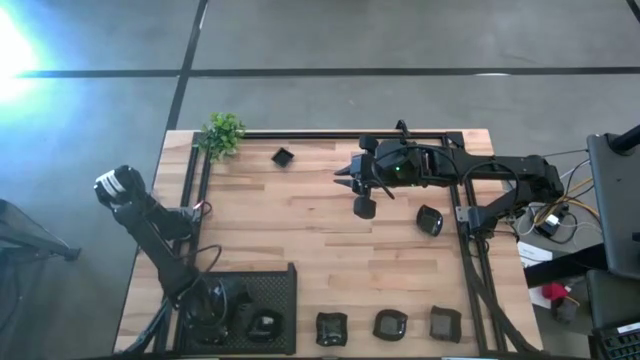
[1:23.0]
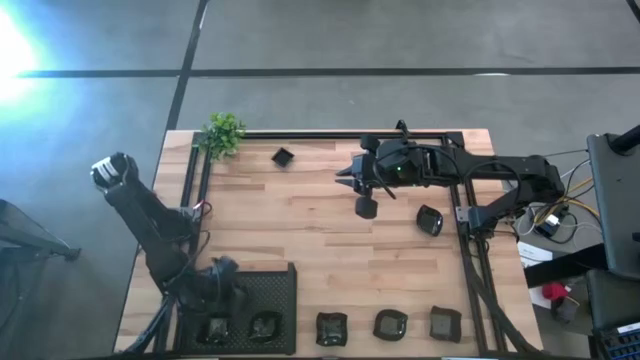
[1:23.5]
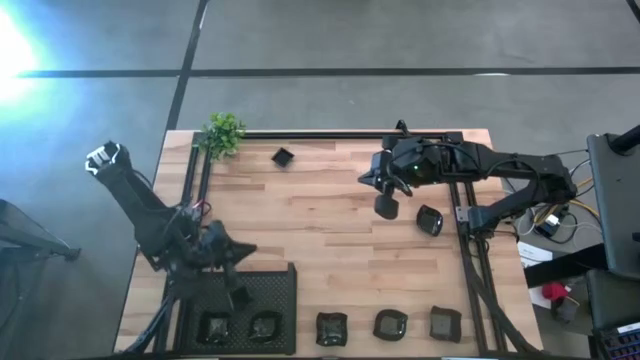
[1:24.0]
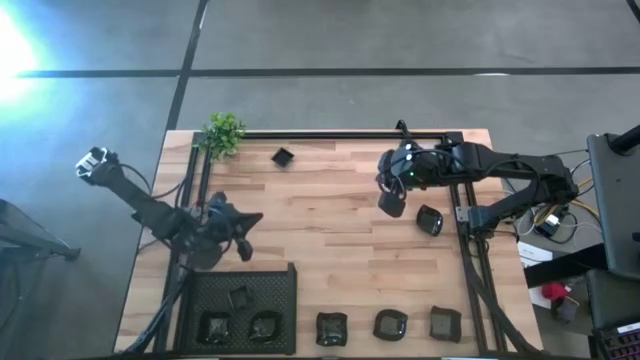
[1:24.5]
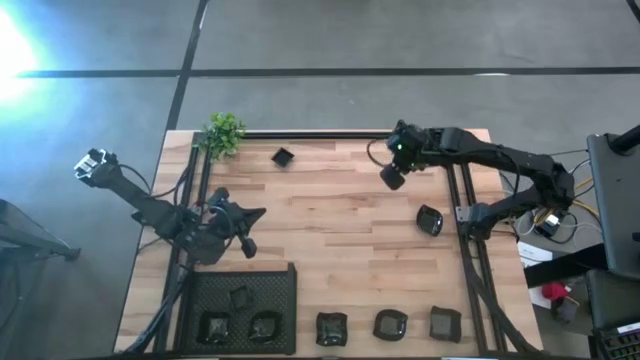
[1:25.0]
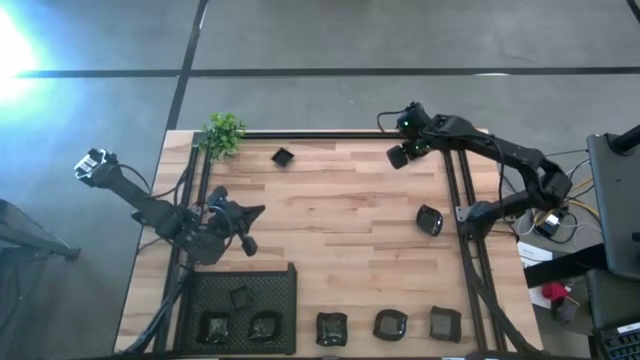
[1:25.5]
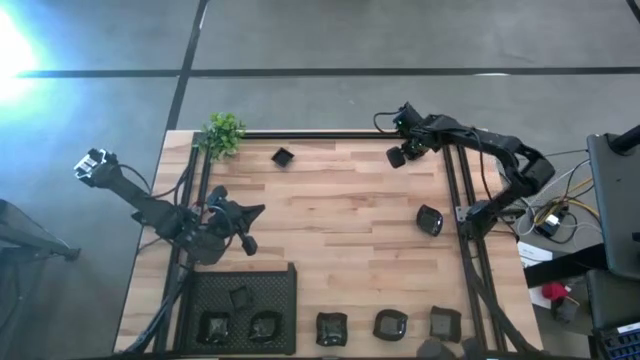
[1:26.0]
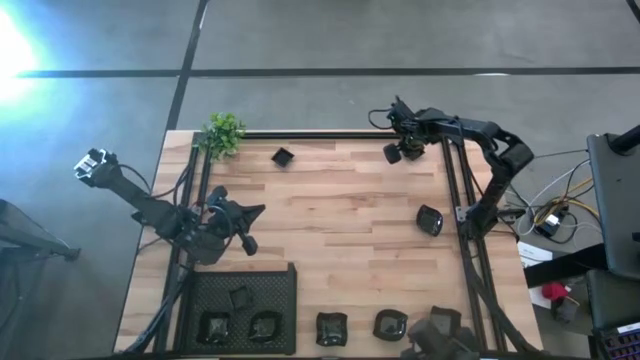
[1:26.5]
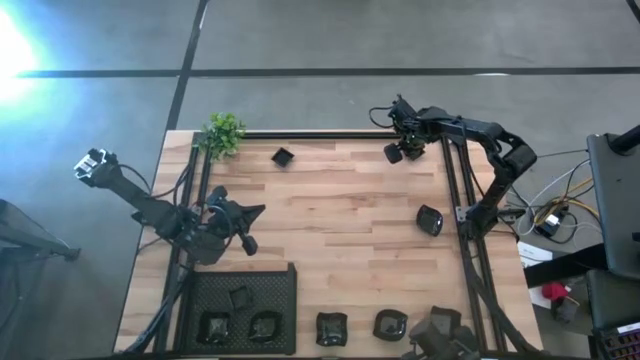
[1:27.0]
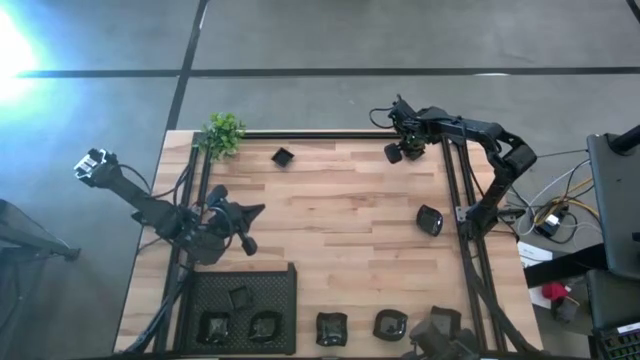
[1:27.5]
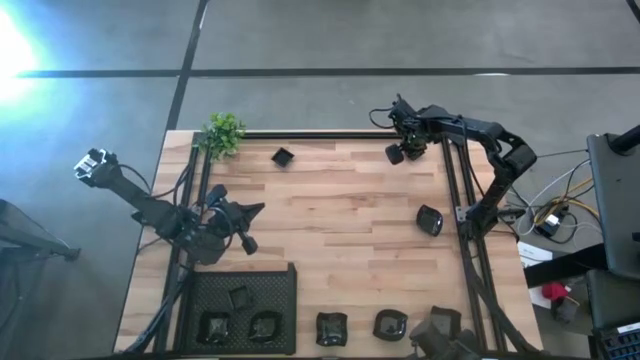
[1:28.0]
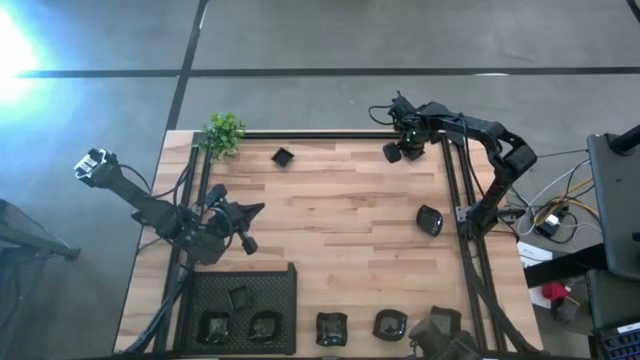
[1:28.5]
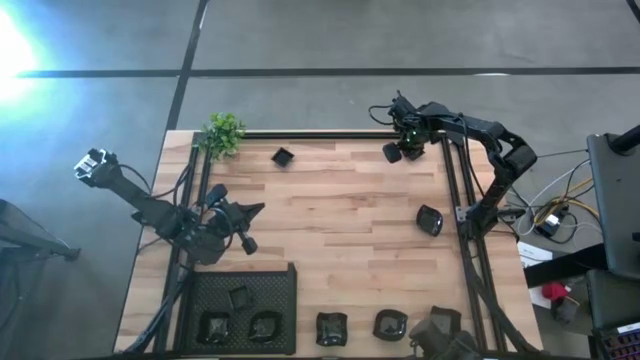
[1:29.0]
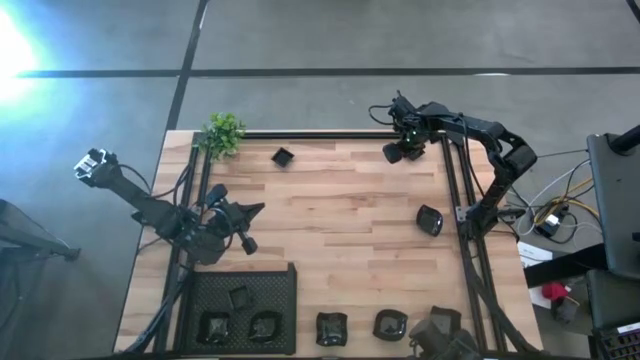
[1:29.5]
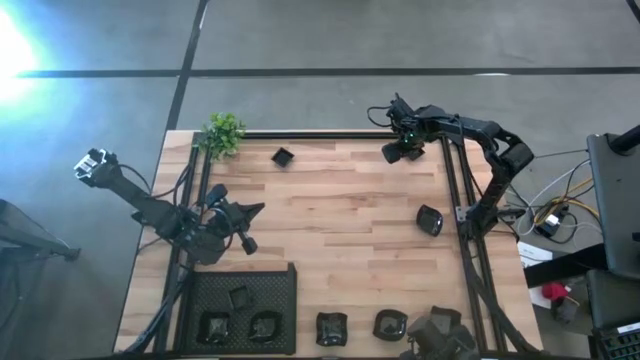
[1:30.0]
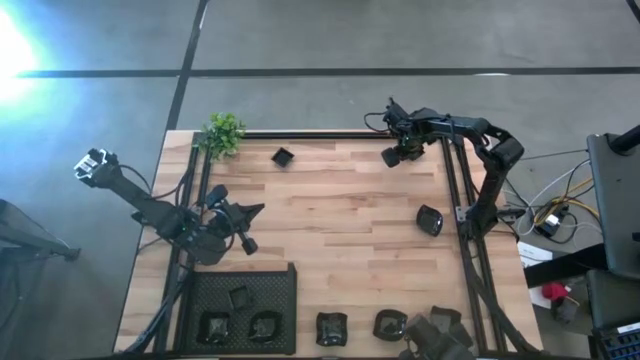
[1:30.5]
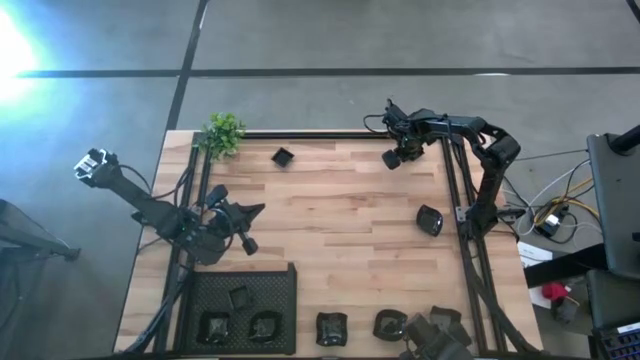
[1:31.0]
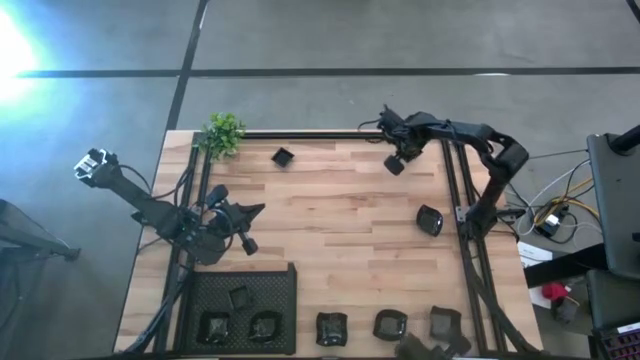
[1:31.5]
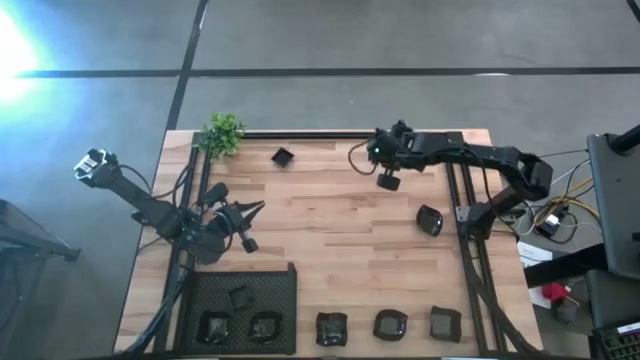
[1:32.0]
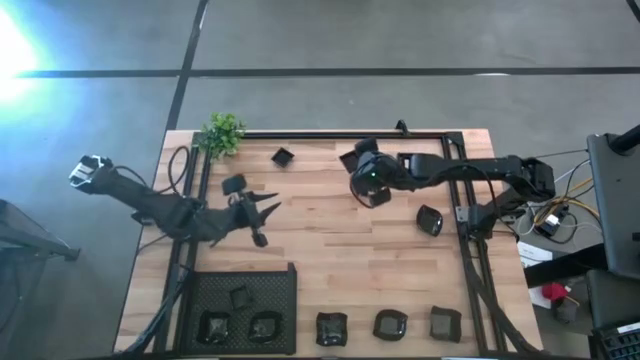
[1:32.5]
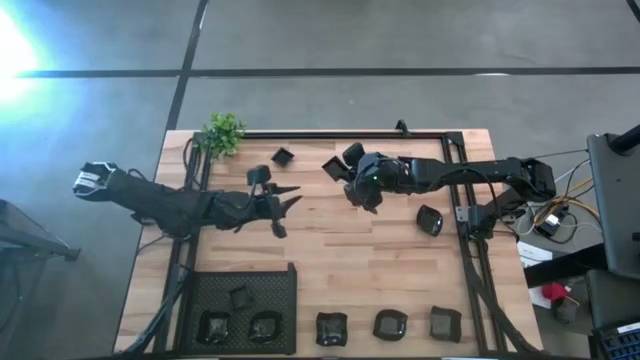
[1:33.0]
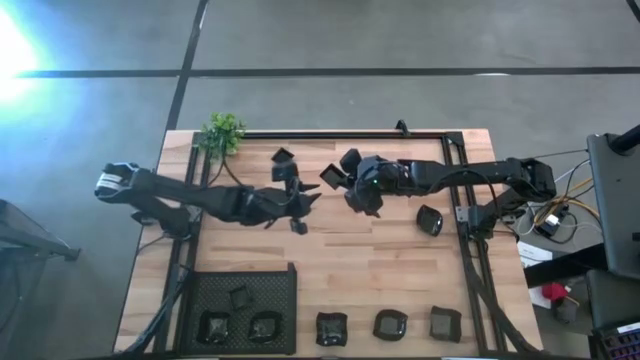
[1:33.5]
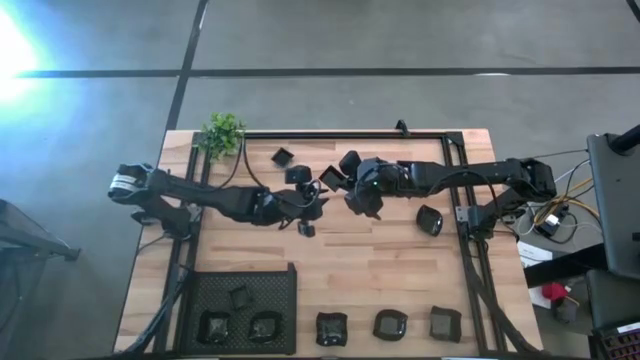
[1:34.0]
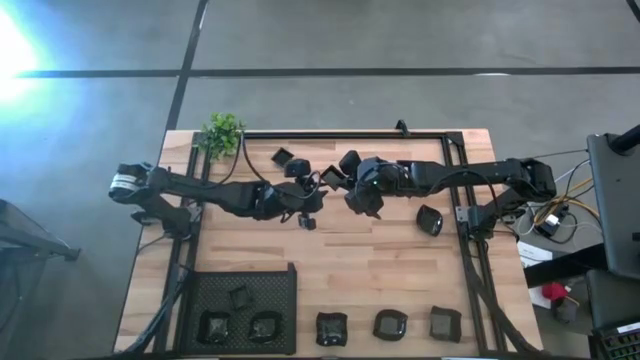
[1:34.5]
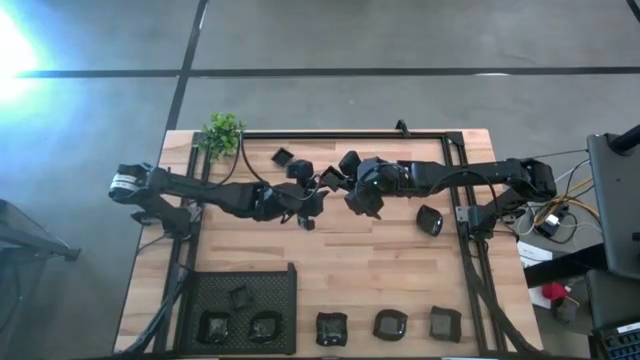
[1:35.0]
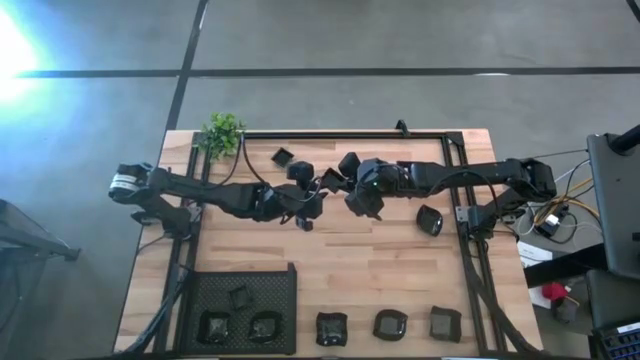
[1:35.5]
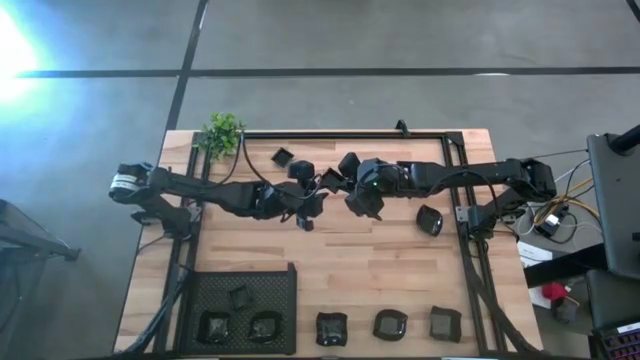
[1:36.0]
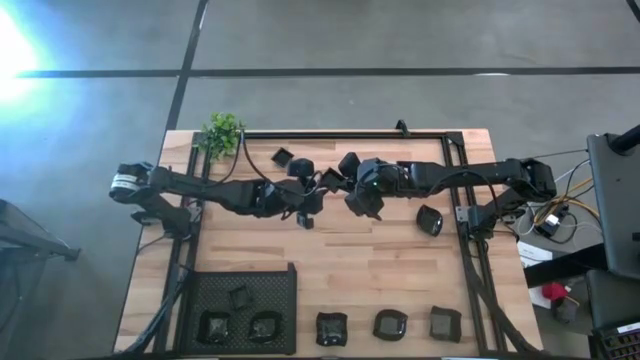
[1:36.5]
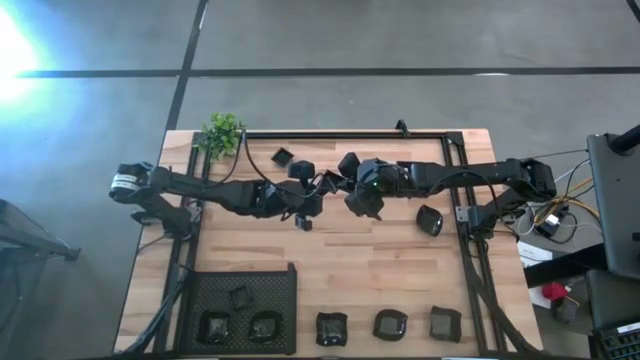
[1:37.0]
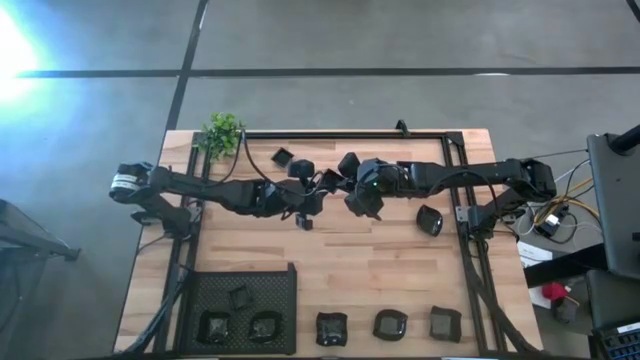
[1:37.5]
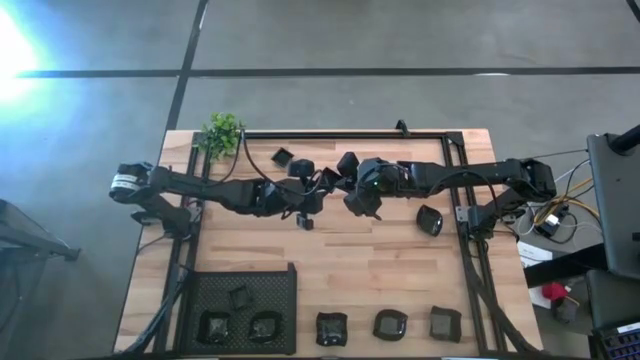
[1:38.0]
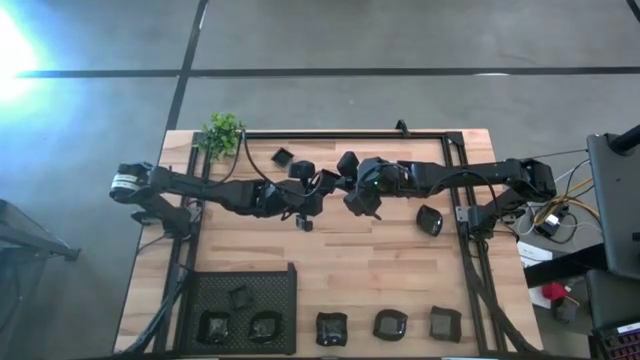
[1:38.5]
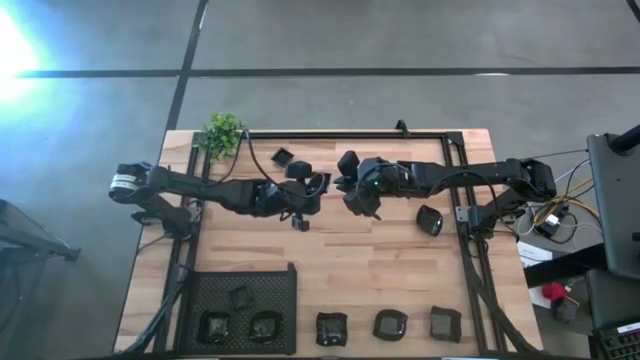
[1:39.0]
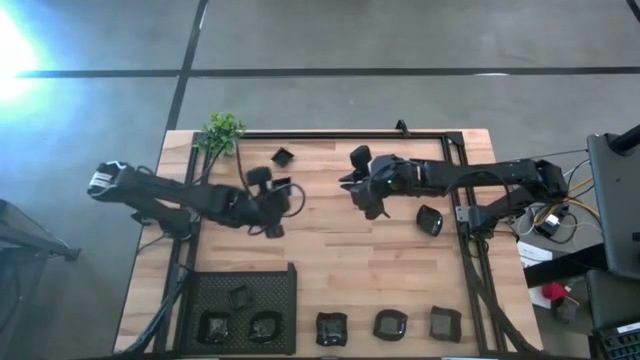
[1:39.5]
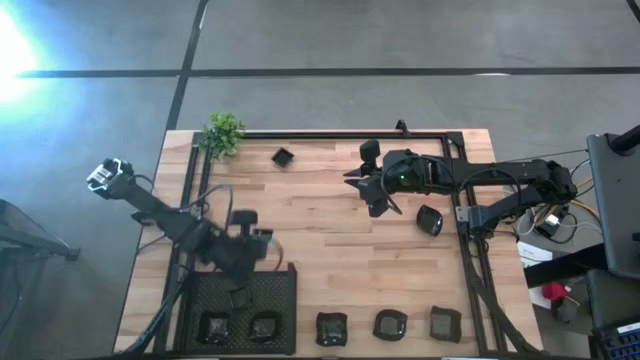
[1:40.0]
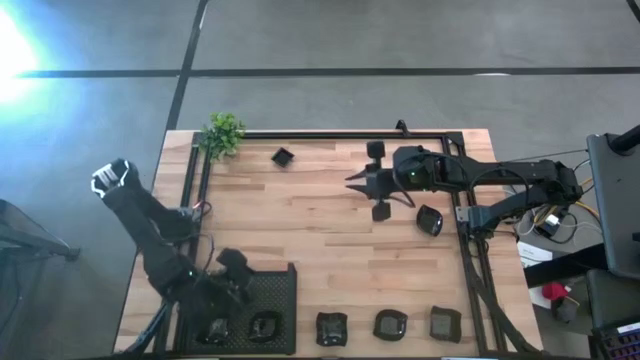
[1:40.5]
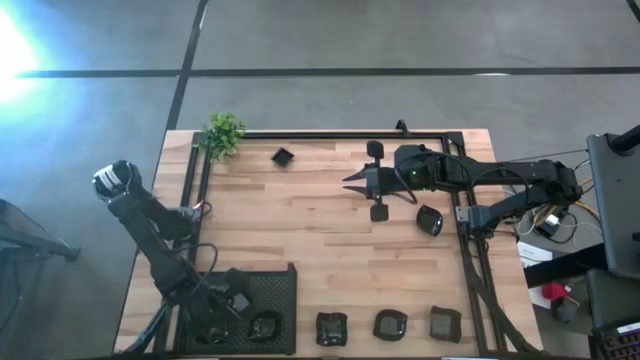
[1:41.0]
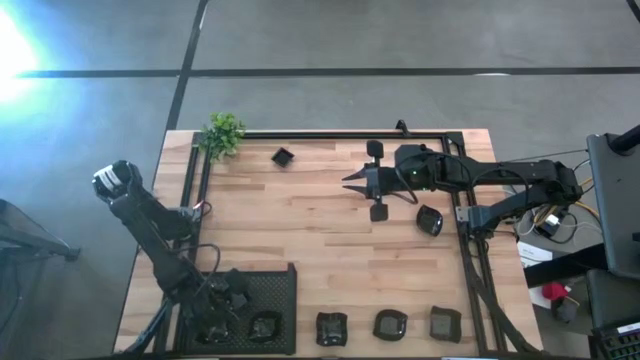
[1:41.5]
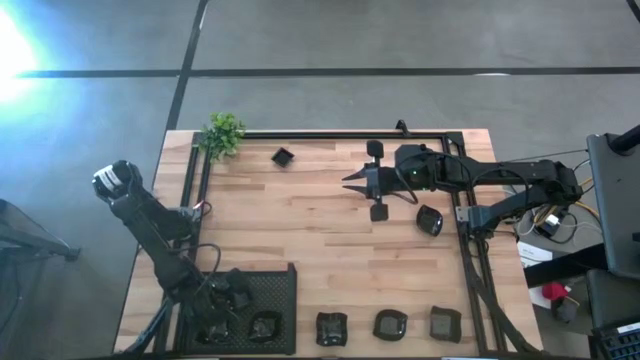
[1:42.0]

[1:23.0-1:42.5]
Task: Pick & Place Mini shaped plates
Stack the square plate on top of the square plate on the shelf

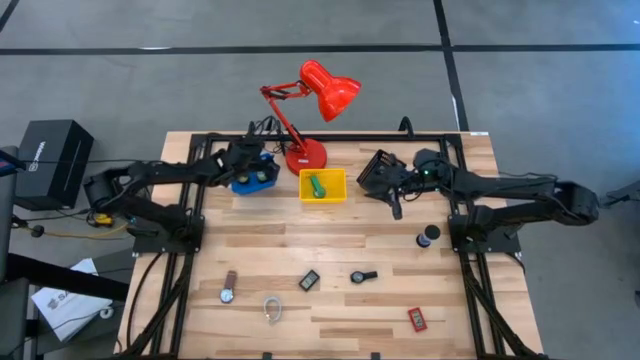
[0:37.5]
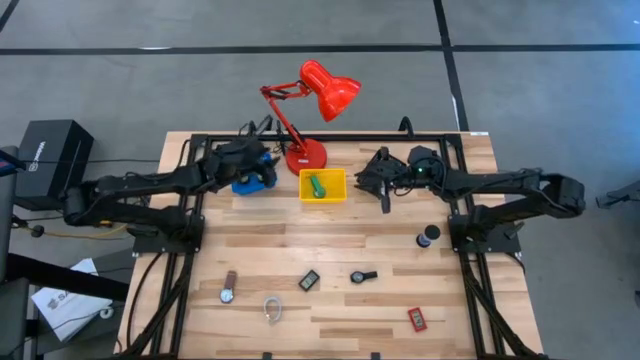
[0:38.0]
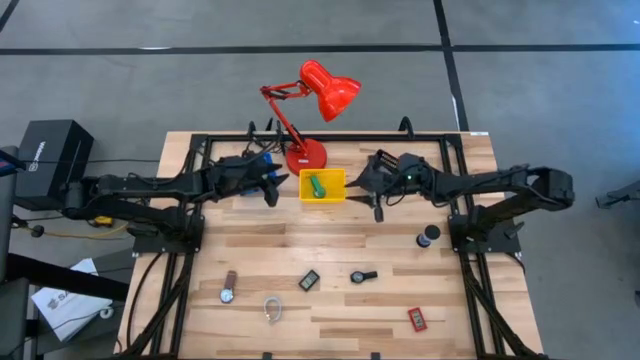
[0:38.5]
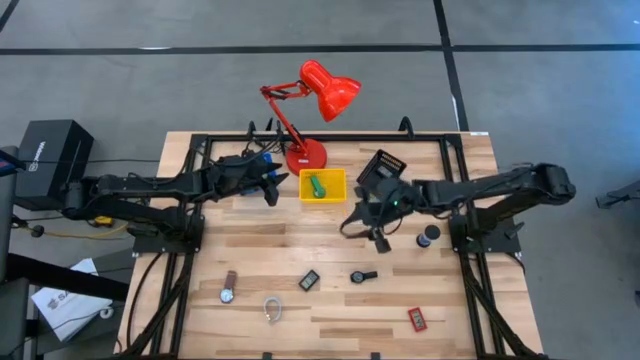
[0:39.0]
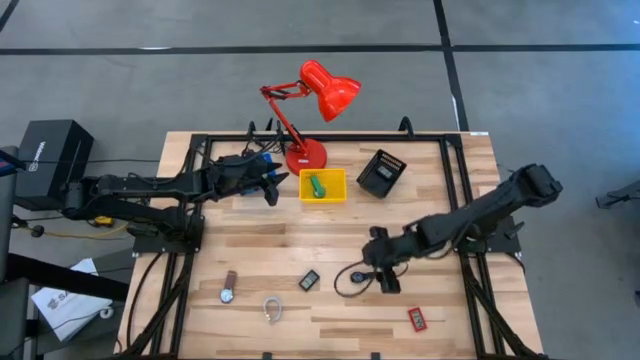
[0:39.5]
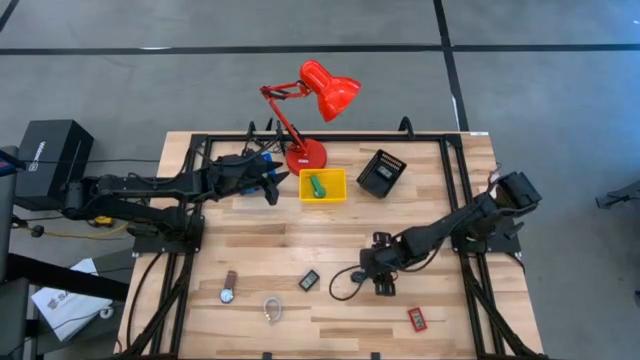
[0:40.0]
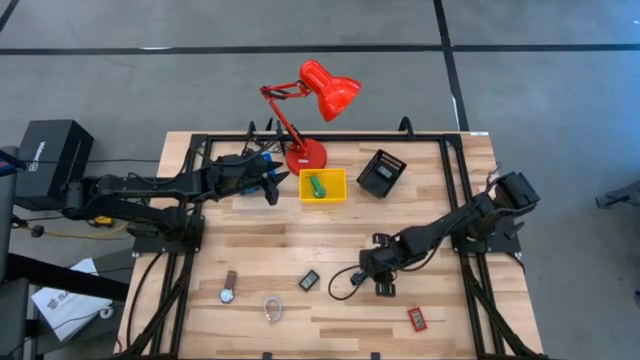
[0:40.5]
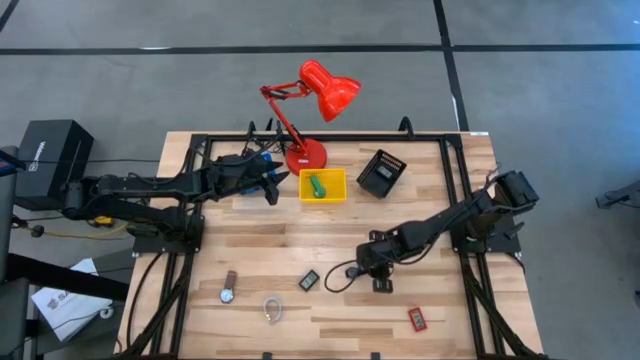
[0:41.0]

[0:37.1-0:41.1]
Task: Pick & Place Office items
Put the black wrist watch into the yellow bin
